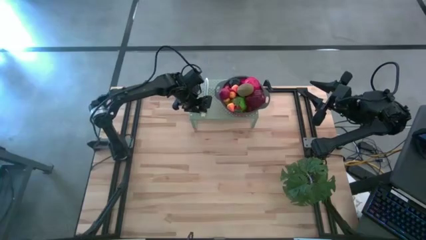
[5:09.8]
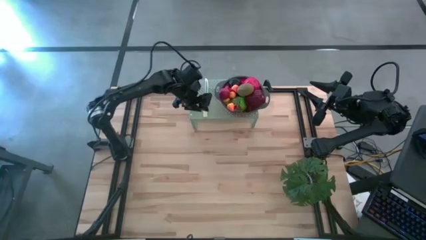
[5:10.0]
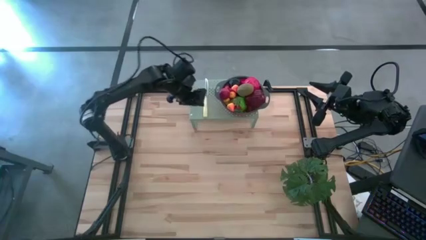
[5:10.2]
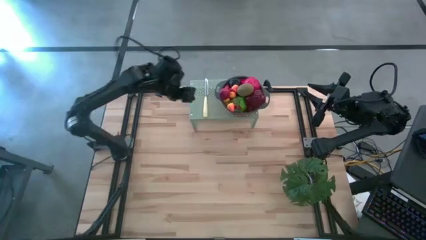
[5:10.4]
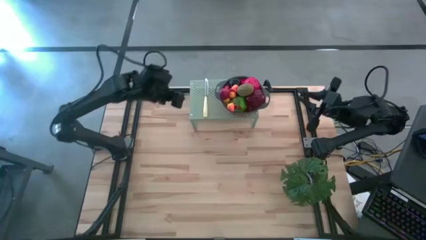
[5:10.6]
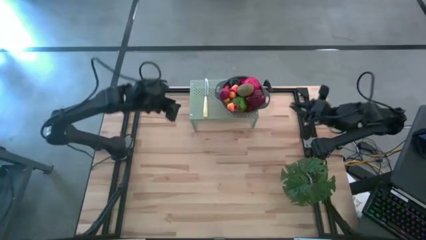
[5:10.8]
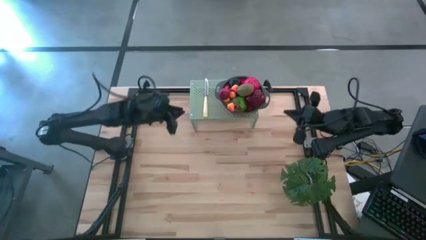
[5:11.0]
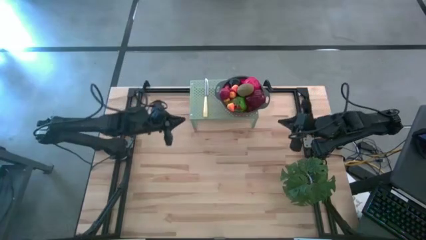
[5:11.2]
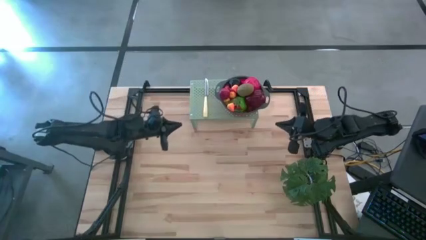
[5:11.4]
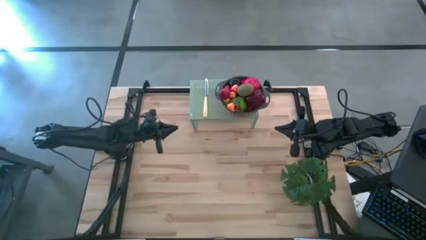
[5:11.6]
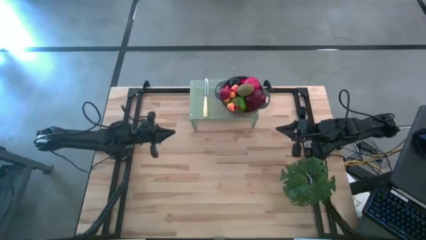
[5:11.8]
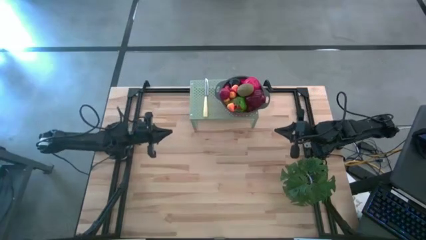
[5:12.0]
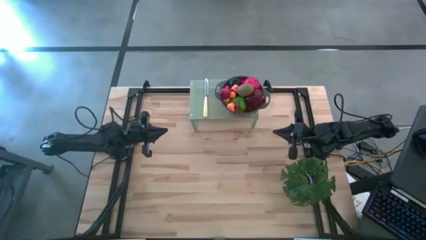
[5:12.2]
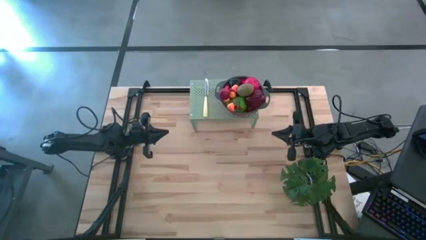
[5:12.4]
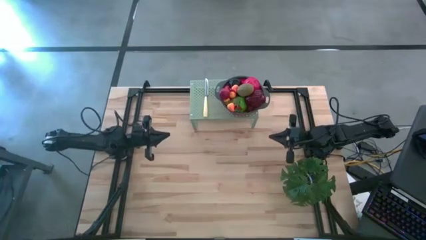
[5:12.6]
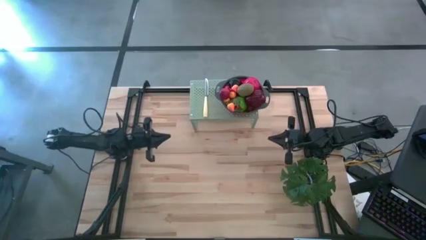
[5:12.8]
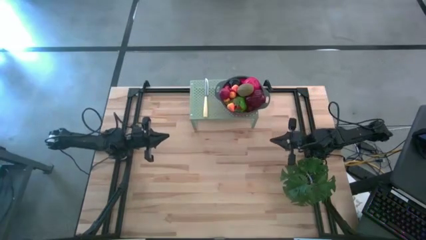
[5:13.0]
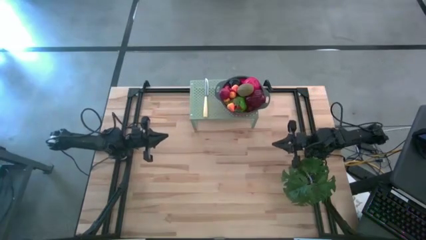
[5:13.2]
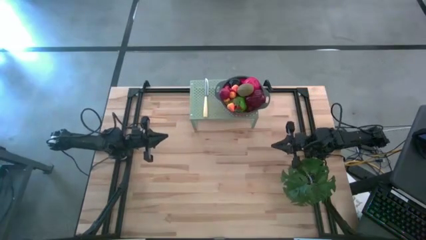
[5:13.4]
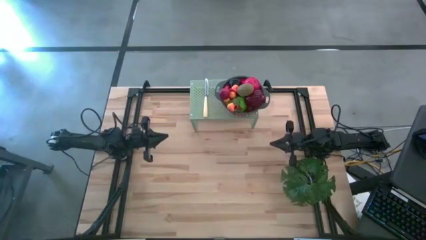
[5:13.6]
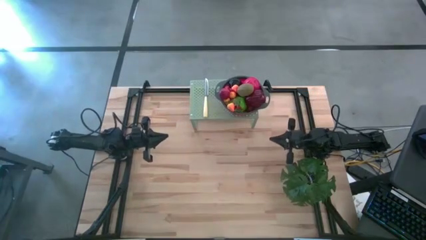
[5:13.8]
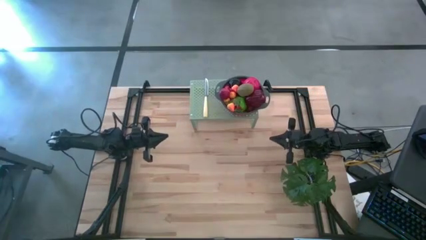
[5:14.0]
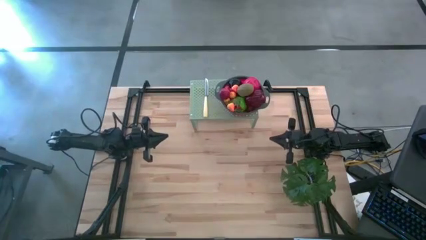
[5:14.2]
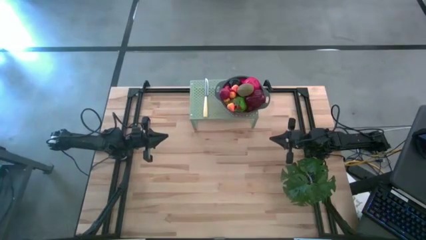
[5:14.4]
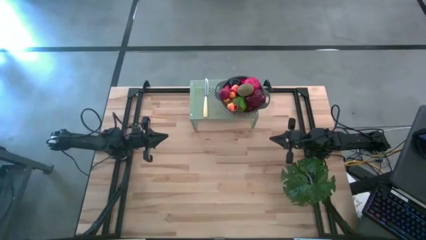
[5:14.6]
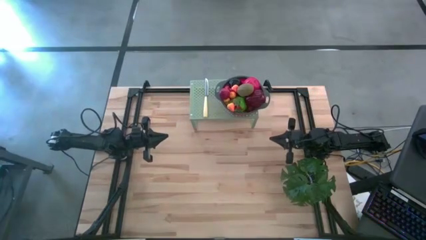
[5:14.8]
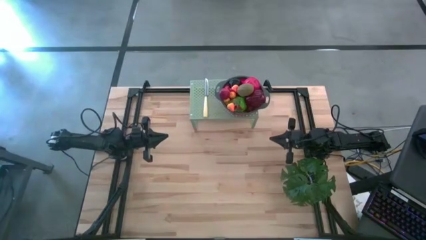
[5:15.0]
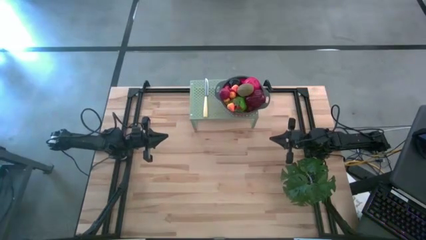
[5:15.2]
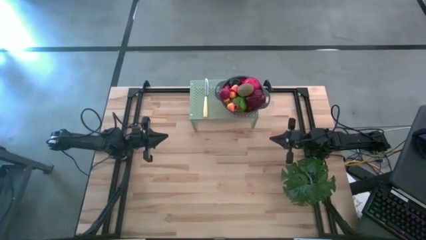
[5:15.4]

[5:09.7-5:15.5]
Task: Pick & Place Fruit
Return to Home Position

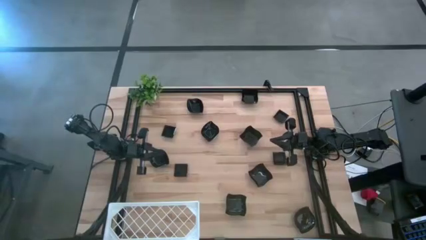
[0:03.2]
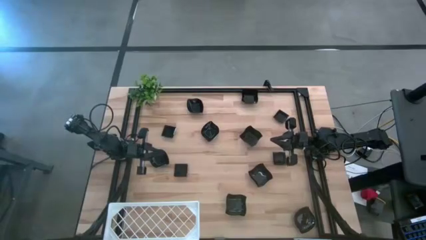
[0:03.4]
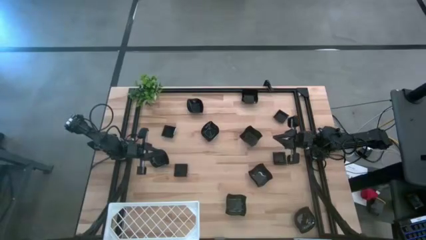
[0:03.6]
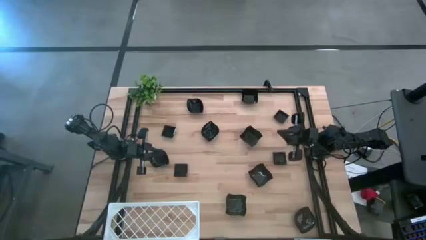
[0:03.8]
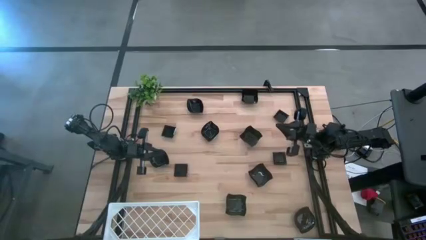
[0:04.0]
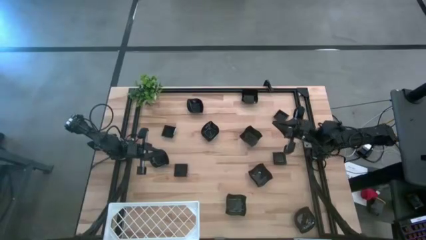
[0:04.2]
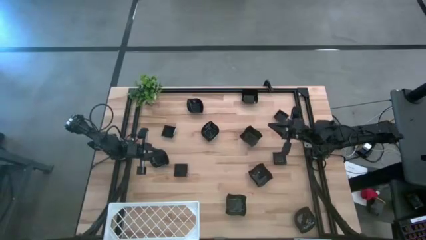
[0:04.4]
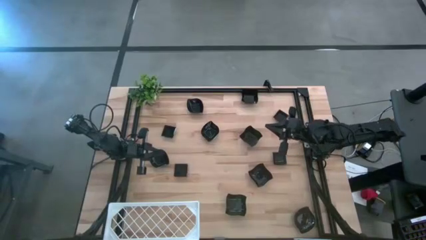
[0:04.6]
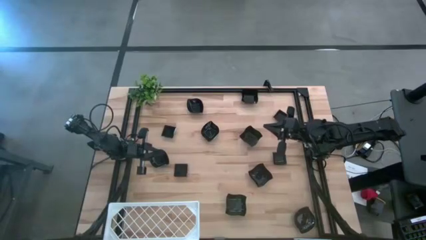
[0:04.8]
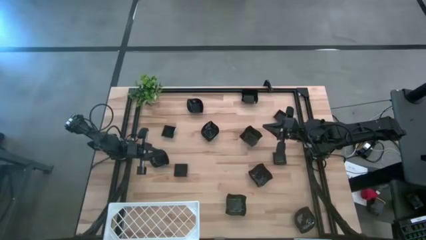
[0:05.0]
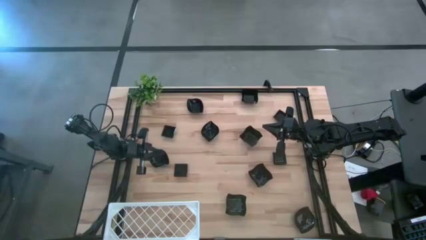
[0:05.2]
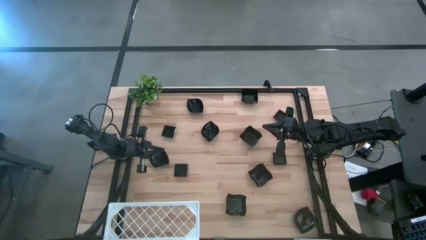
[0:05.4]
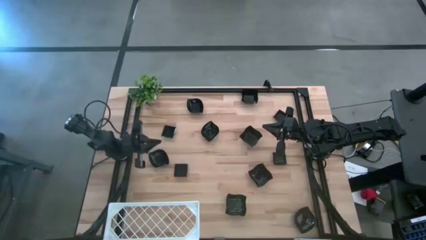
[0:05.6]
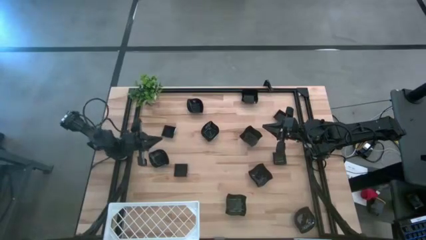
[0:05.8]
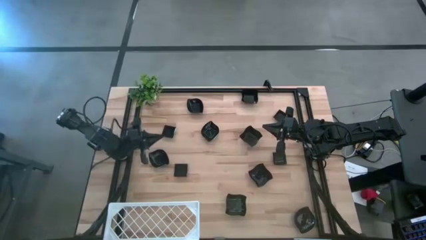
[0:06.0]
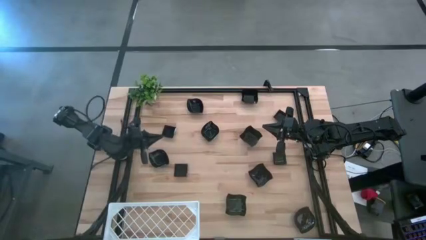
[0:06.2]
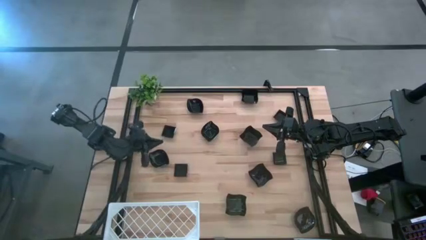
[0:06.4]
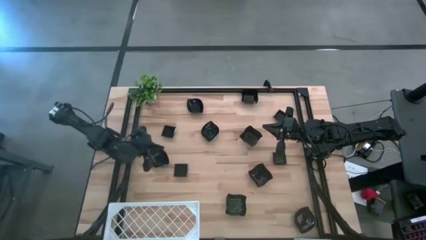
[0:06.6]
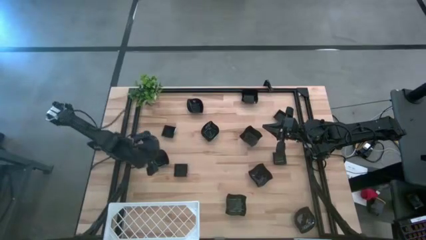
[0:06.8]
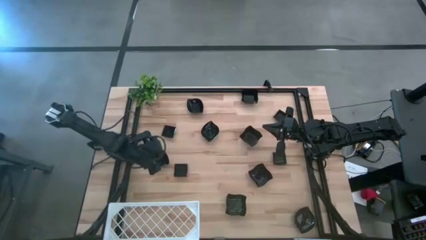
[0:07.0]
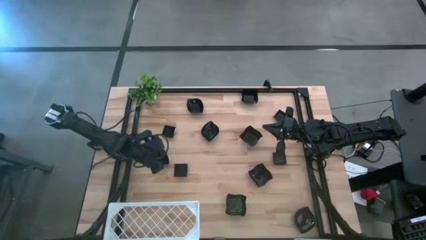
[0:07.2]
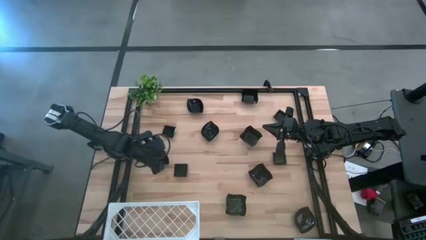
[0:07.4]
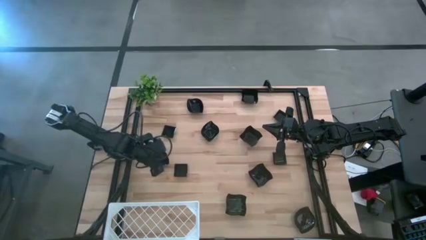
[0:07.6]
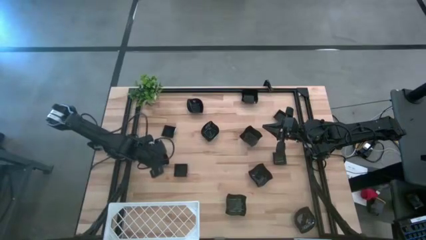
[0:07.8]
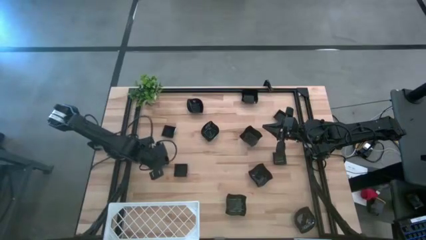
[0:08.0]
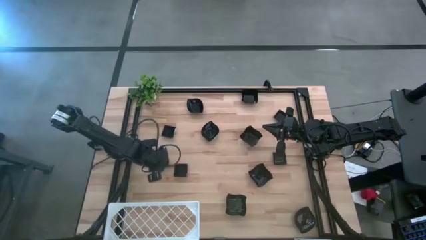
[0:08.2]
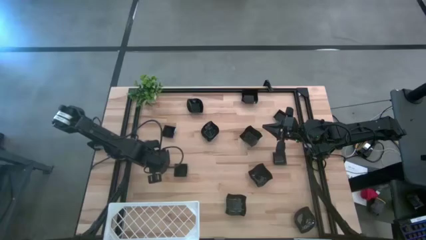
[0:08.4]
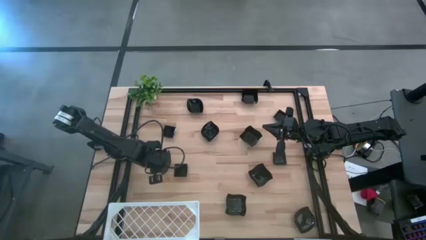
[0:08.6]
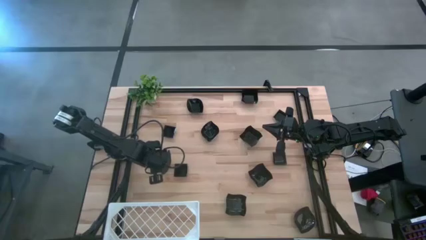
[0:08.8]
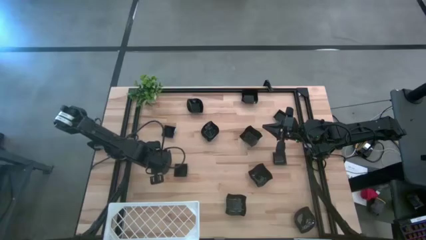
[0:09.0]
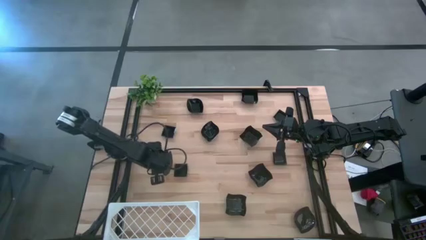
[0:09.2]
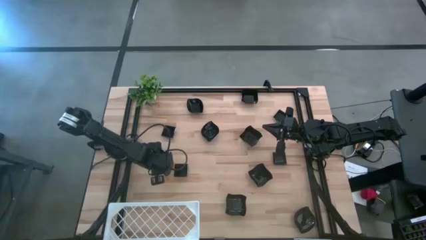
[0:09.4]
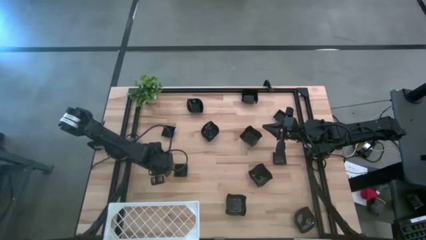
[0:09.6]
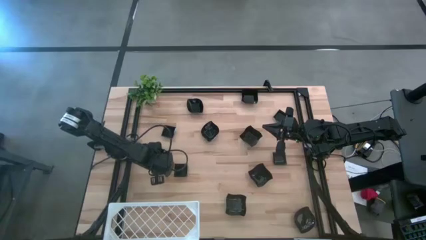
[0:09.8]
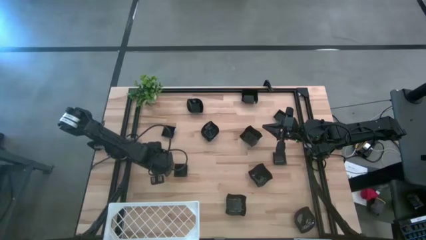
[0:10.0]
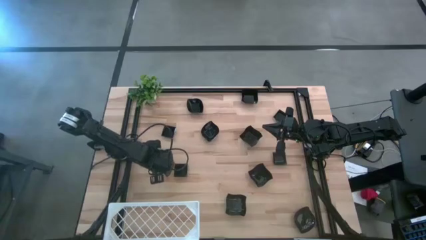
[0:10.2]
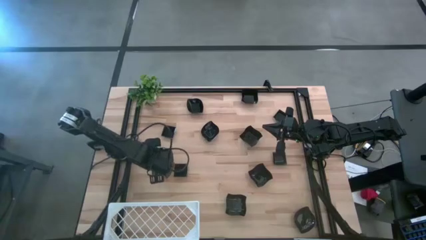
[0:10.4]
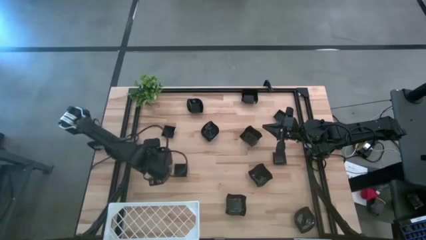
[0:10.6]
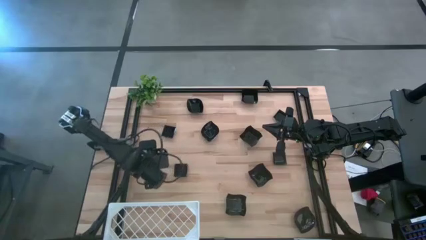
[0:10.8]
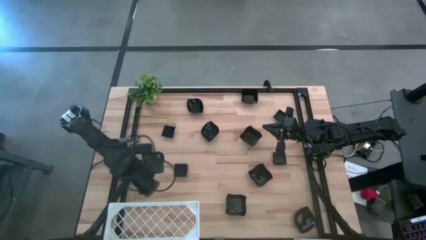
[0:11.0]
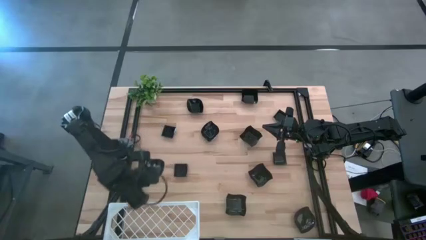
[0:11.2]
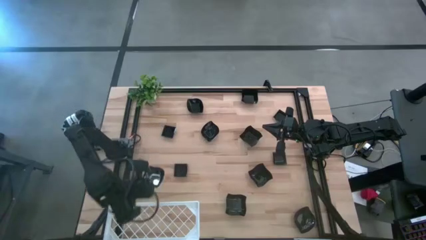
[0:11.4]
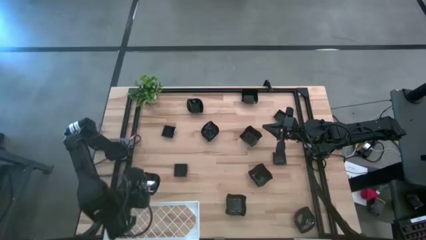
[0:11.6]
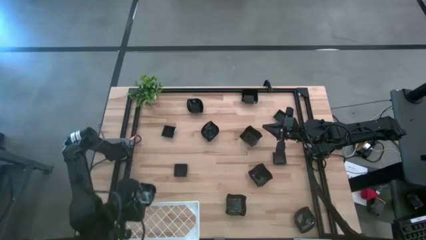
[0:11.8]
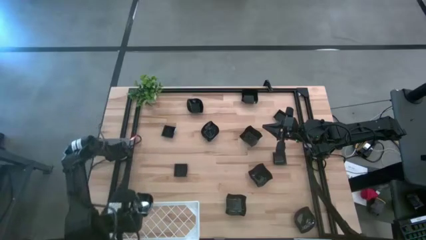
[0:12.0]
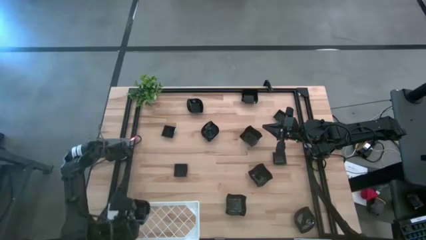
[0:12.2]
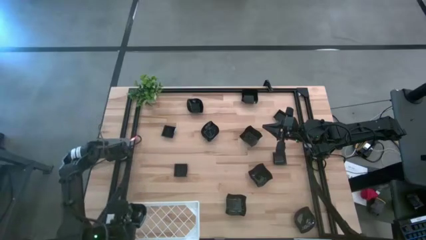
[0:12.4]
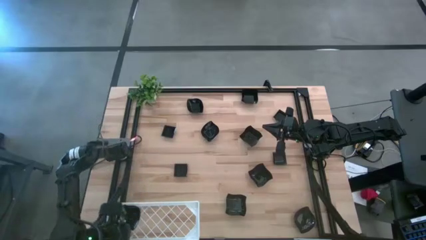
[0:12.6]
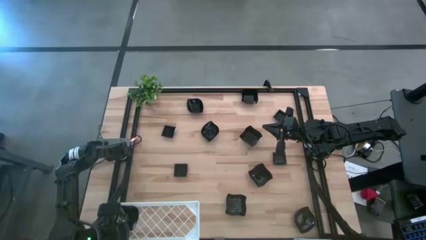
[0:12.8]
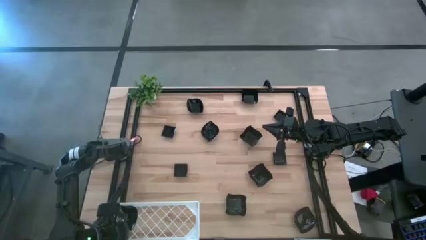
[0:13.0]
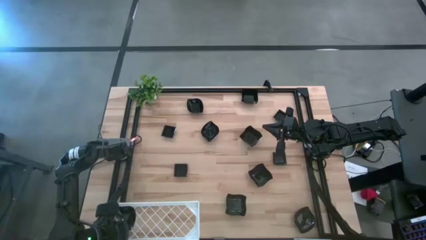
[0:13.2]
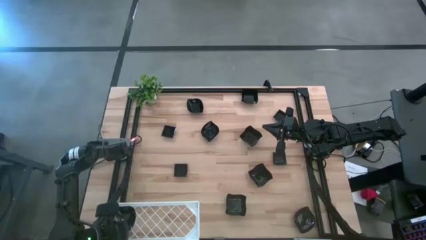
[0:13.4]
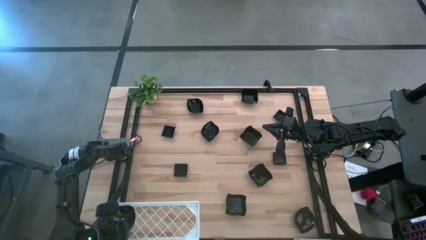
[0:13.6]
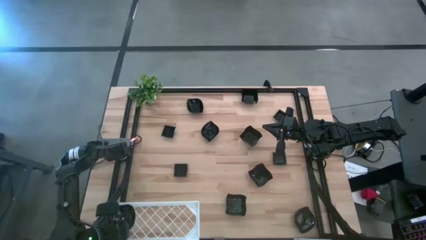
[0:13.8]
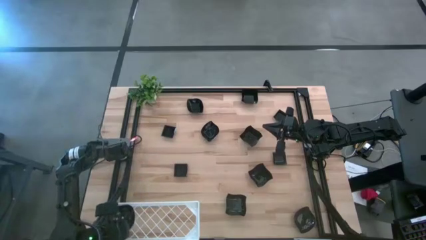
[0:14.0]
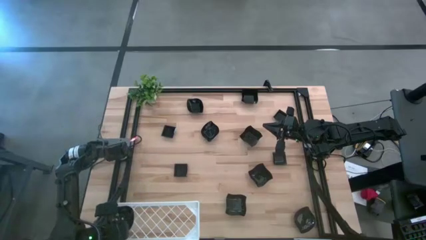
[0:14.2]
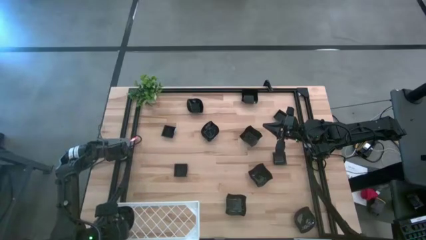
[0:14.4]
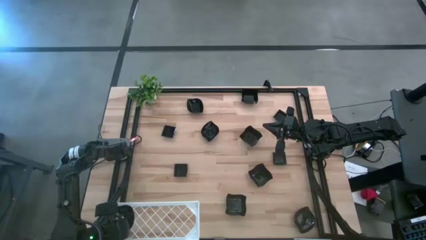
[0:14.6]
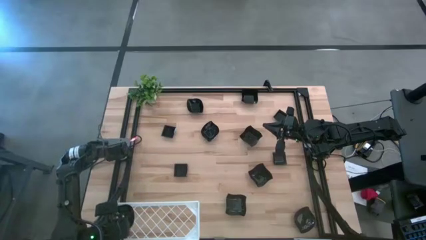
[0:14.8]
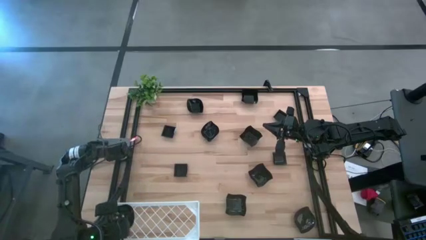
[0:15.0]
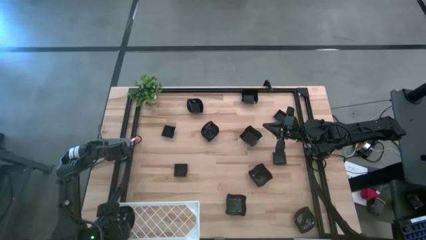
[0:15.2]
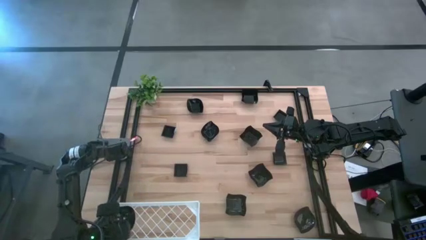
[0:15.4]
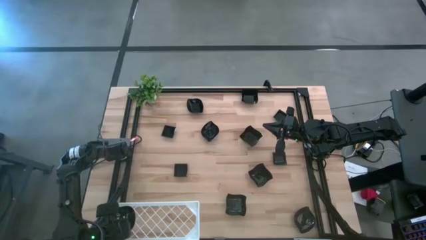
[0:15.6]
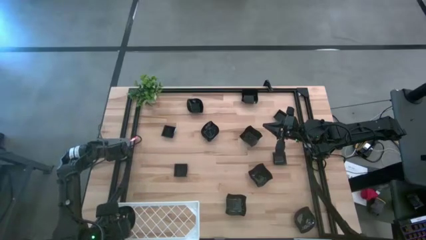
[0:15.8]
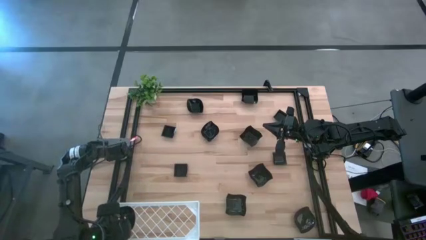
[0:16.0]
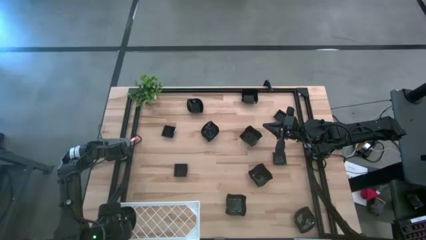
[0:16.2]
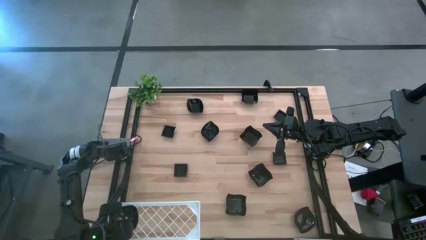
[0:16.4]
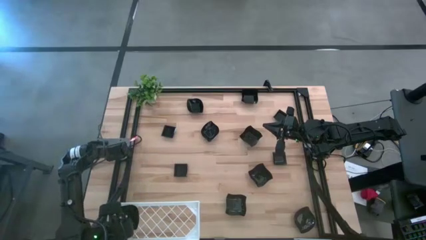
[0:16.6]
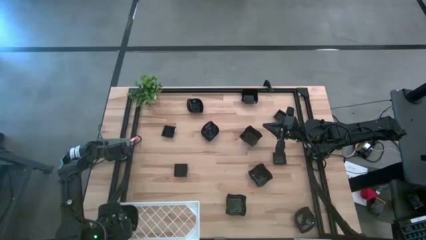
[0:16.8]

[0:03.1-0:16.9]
Task: Pick & Place Mini shaped plates
Put the black leaf shaped plate on the shelf
